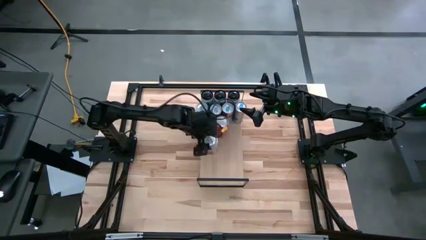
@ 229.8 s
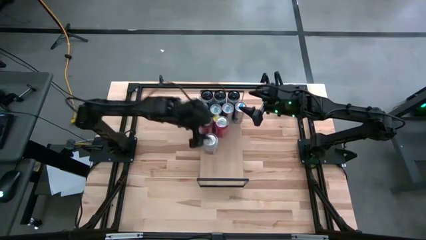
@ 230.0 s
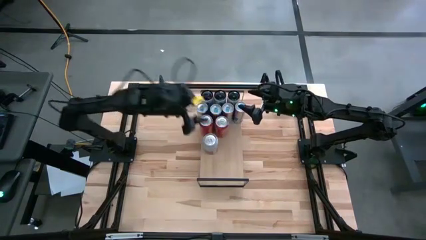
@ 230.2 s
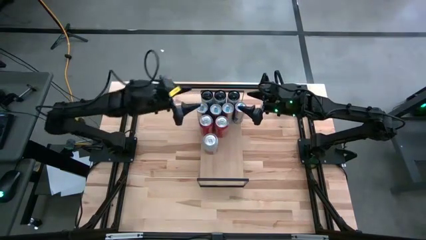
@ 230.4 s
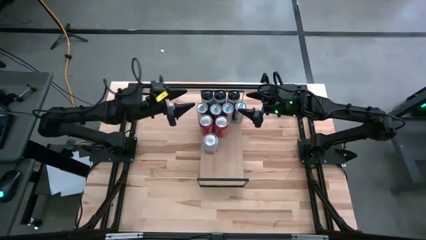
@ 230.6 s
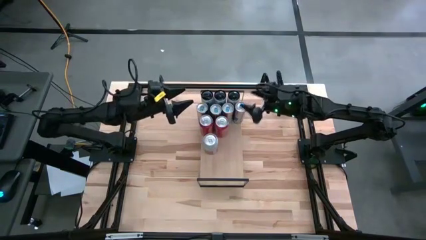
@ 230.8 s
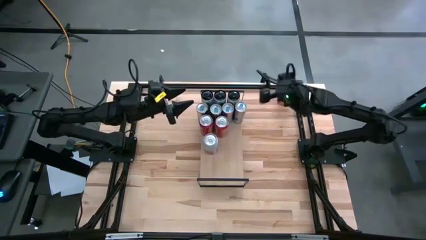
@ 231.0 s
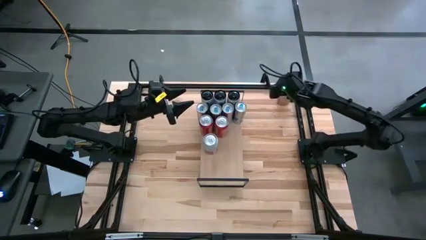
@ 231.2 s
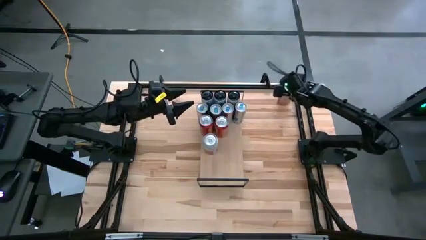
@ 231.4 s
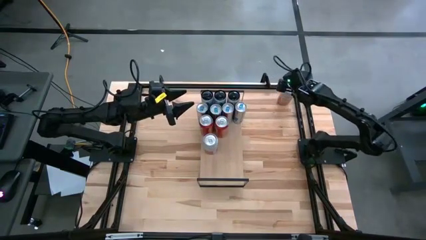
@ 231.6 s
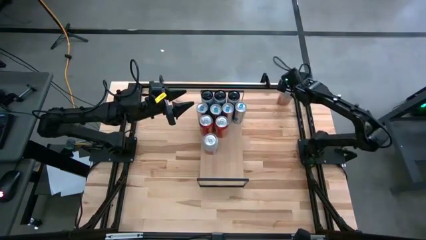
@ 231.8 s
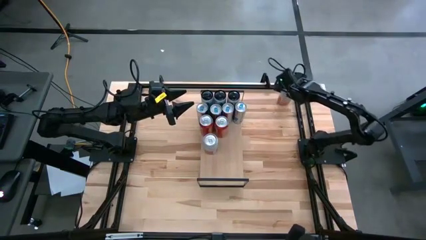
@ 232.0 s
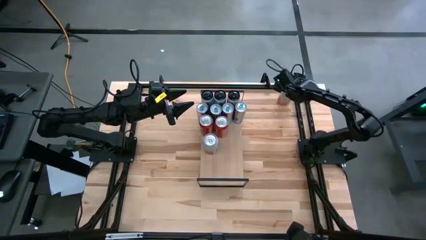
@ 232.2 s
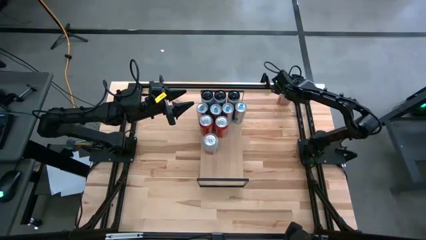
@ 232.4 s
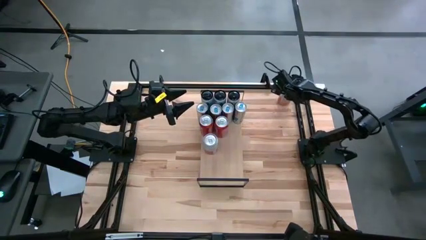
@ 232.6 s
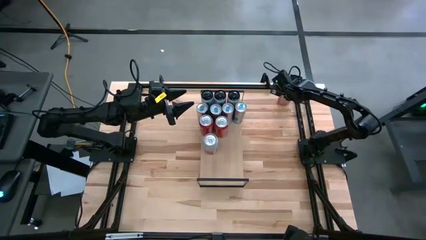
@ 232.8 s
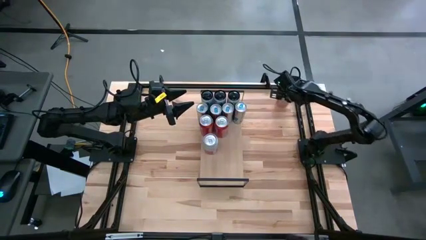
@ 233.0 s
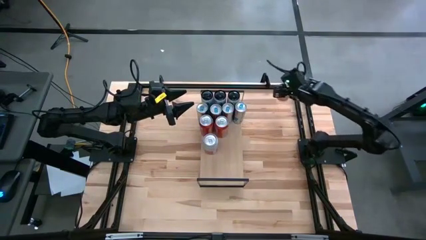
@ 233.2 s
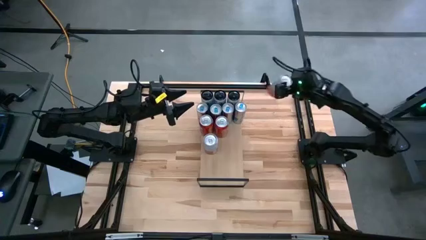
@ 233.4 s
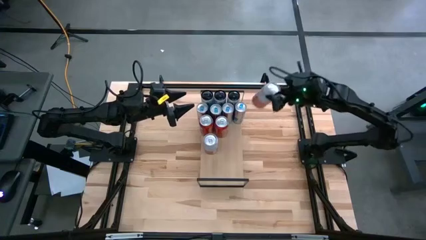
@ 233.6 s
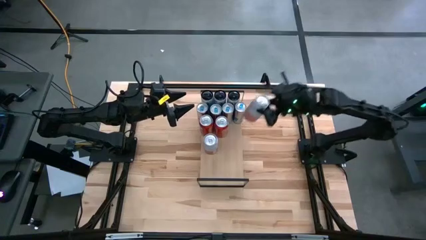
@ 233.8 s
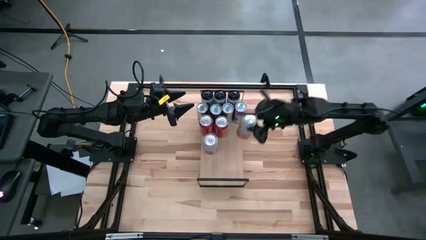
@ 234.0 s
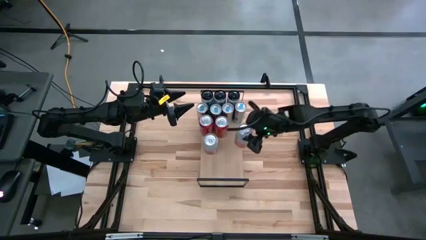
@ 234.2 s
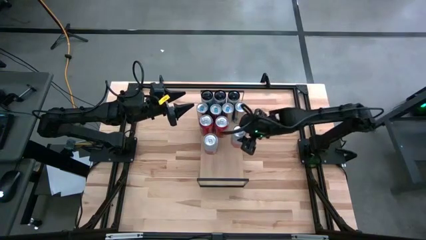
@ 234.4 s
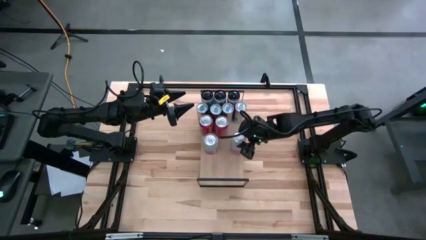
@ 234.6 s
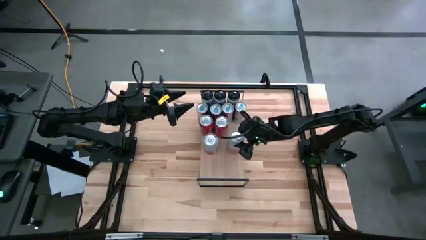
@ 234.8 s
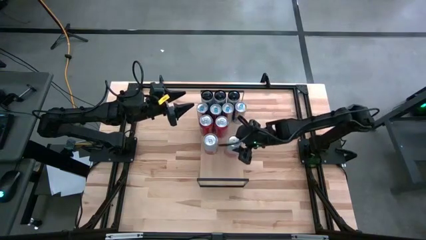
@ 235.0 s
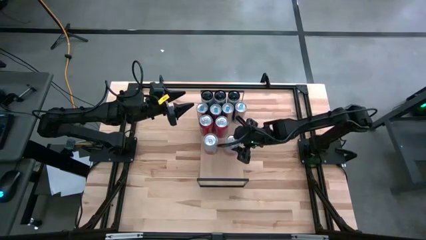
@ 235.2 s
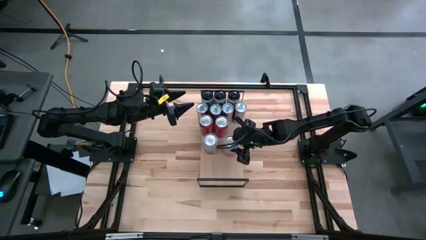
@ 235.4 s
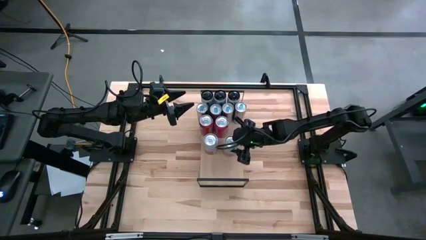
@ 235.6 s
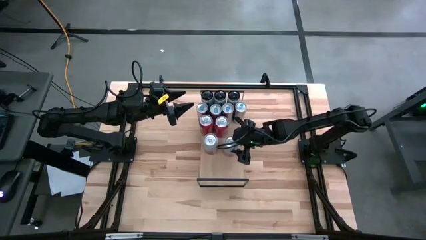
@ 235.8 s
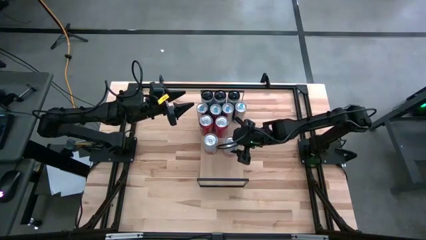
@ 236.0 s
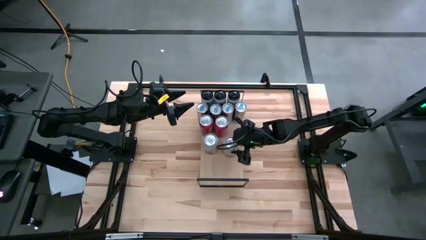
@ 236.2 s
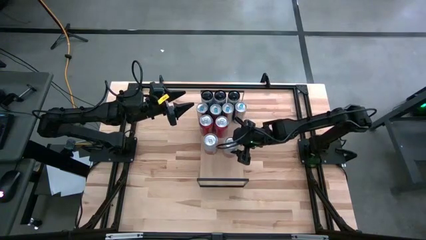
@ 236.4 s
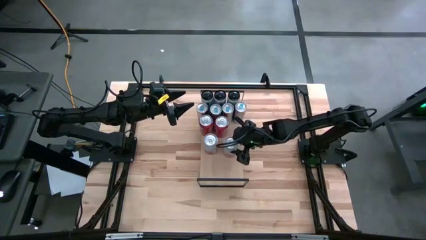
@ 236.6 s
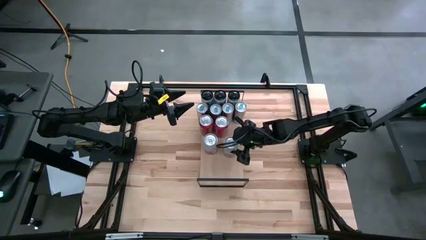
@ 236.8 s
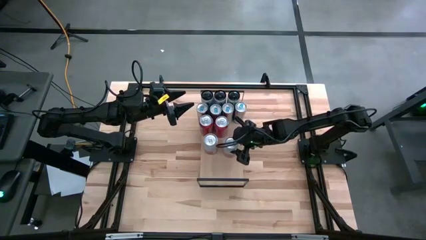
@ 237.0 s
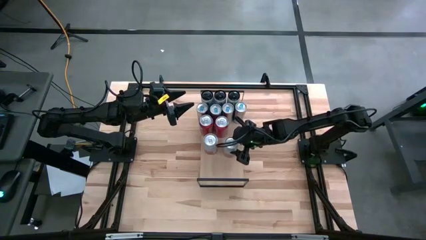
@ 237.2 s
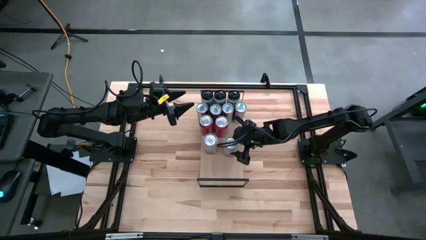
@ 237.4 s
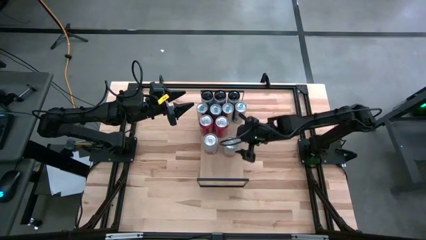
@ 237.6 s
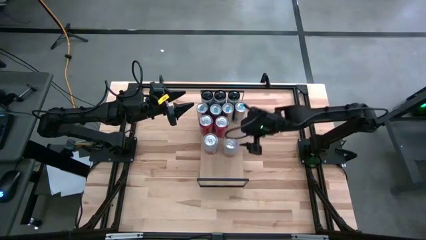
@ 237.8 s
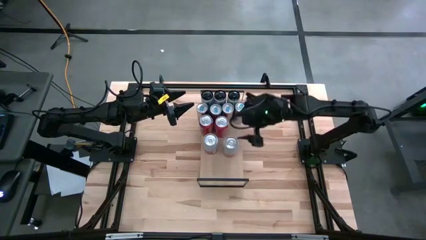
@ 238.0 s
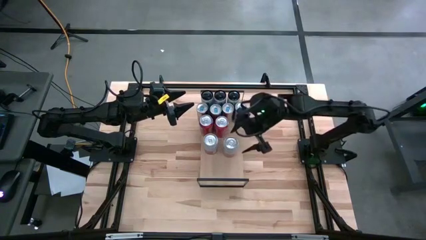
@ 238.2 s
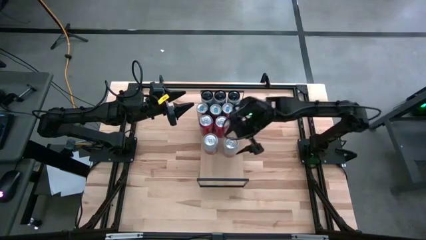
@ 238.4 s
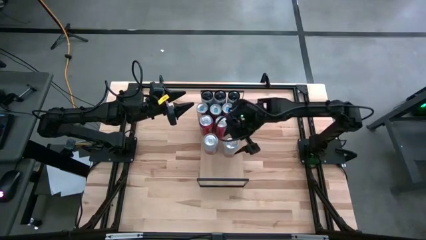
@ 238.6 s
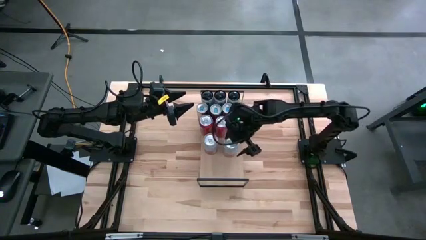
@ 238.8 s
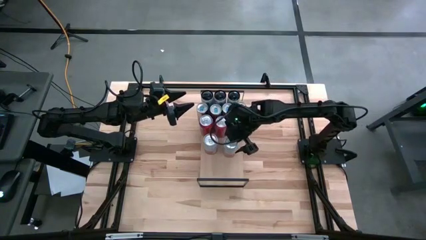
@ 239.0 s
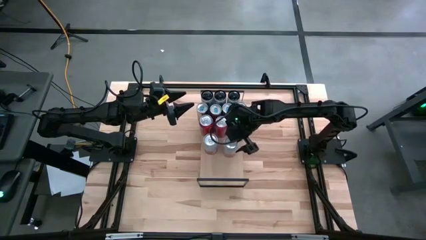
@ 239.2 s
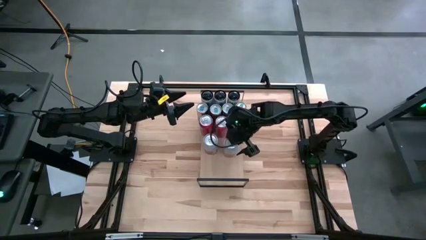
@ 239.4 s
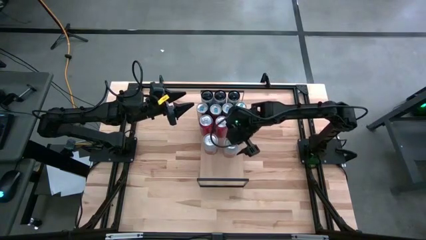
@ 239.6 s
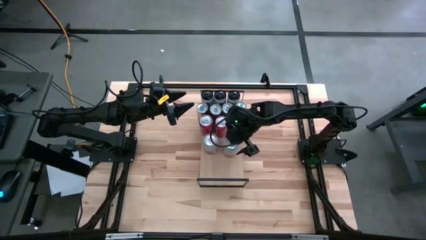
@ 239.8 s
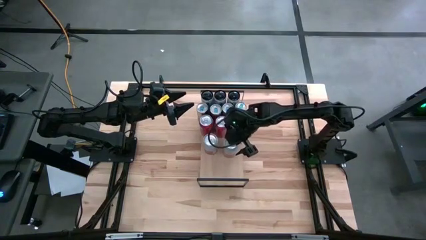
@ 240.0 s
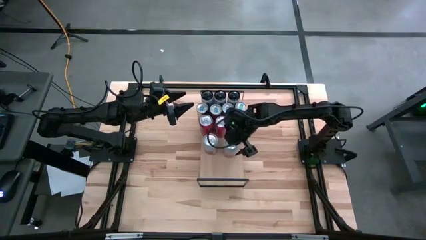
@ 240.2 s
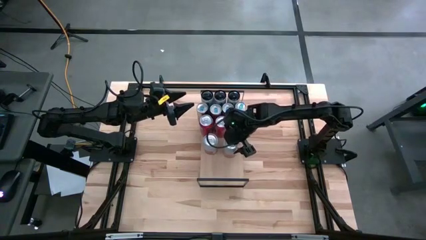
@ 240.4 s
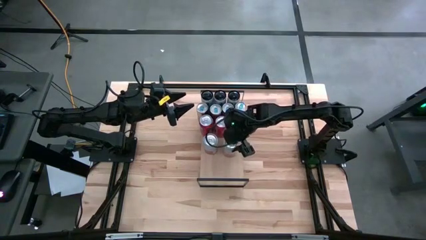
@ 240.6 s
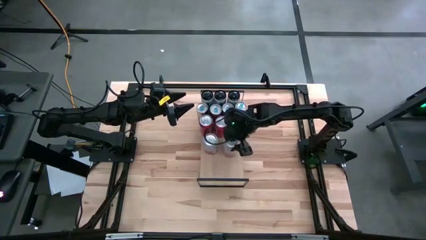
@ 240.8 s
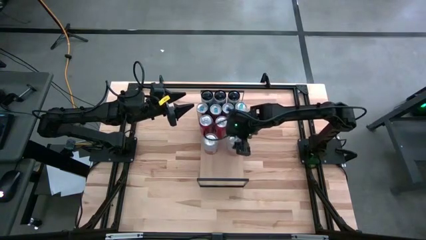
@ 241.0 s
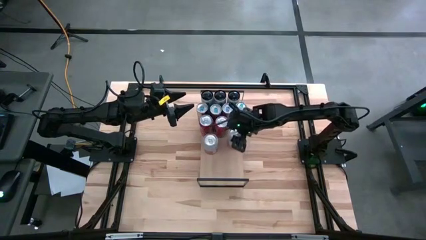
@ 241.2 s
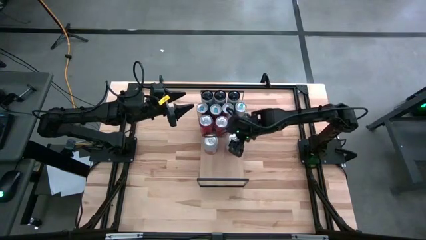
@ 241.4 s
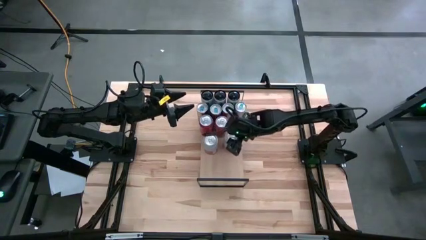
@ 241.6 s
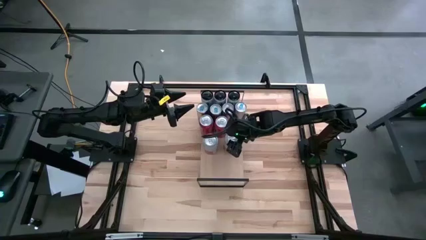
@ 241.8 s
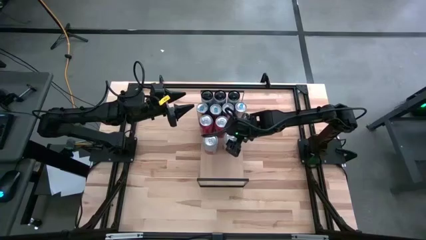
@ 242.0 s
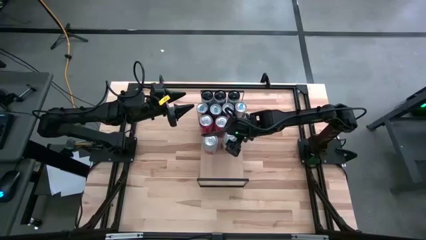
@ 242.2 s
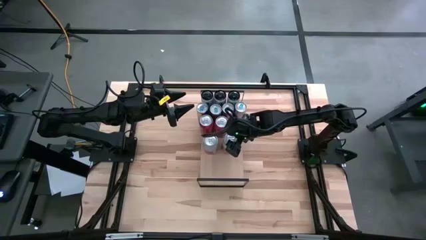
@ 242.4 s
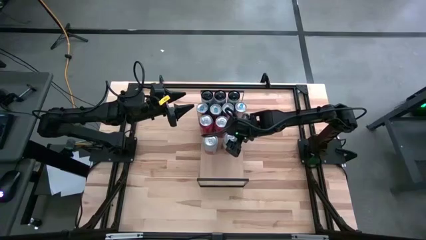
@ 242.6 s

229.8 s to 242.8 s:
Task: Place canned beverage on shelf
Put the pink-white soda can on the shelf aligned with the other pink-white soda can

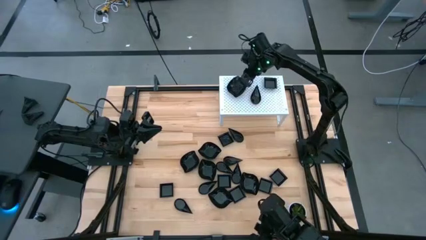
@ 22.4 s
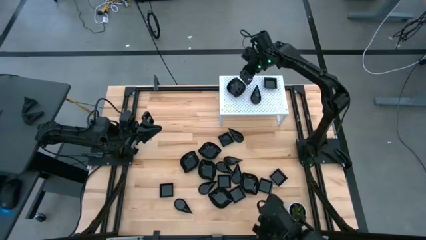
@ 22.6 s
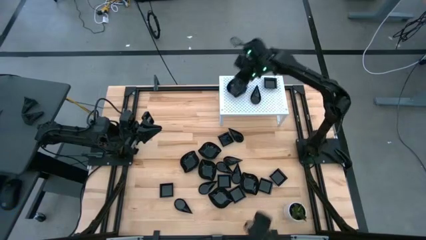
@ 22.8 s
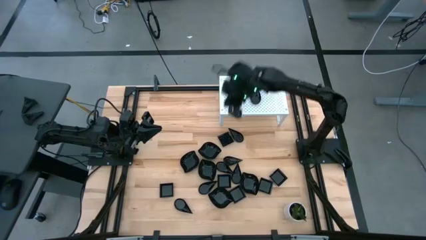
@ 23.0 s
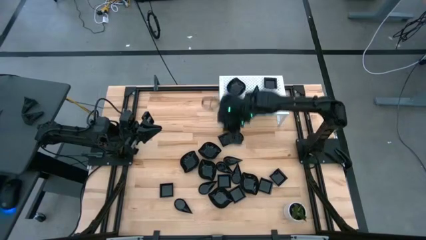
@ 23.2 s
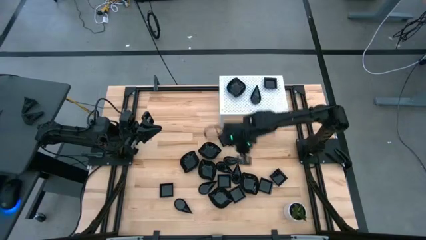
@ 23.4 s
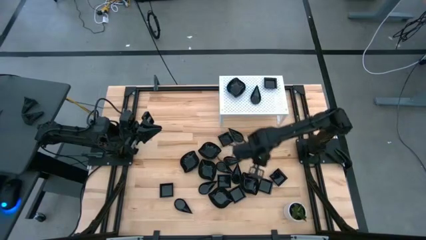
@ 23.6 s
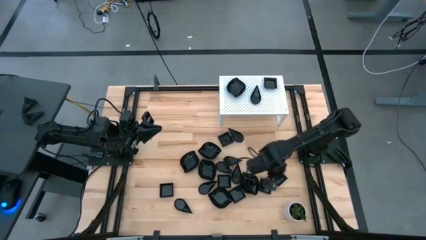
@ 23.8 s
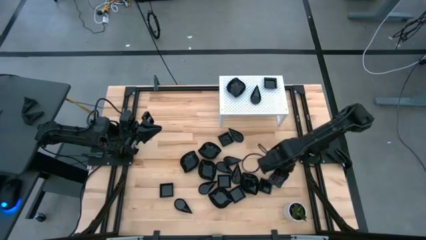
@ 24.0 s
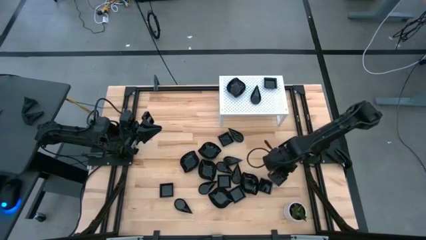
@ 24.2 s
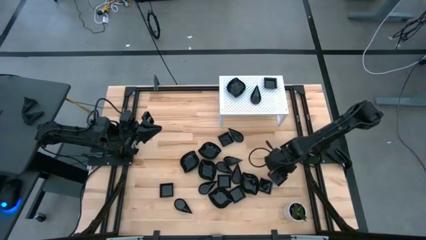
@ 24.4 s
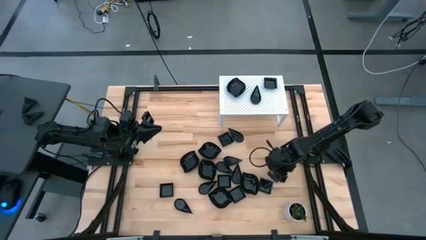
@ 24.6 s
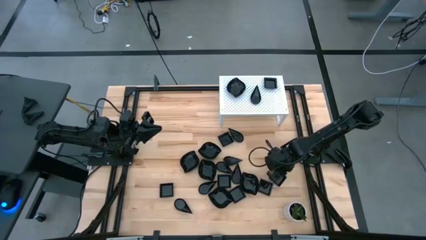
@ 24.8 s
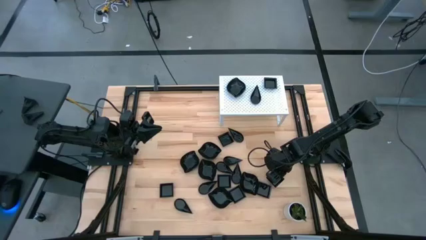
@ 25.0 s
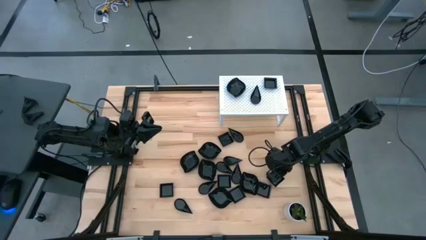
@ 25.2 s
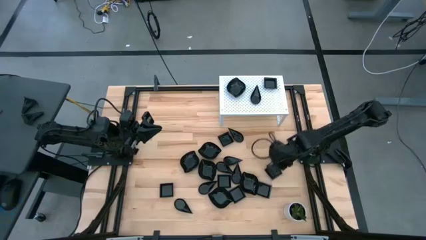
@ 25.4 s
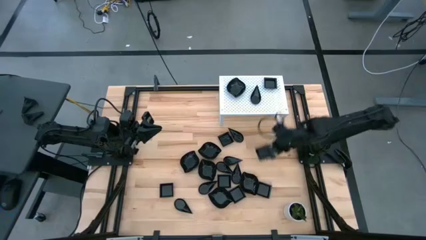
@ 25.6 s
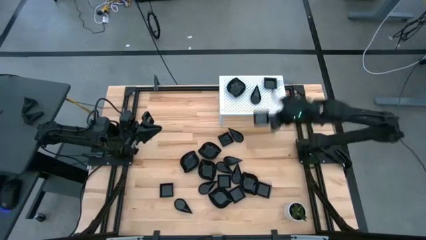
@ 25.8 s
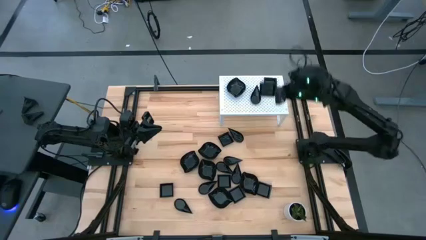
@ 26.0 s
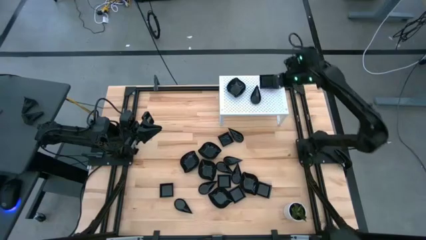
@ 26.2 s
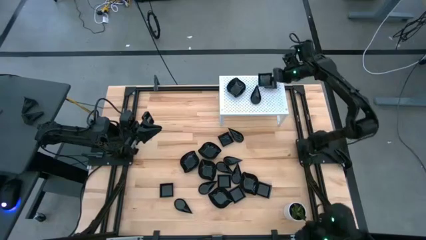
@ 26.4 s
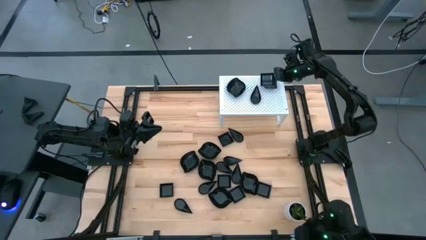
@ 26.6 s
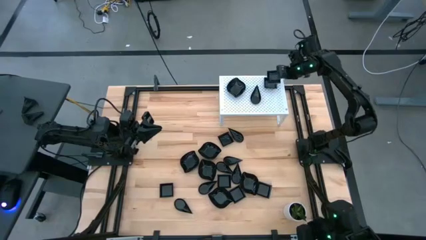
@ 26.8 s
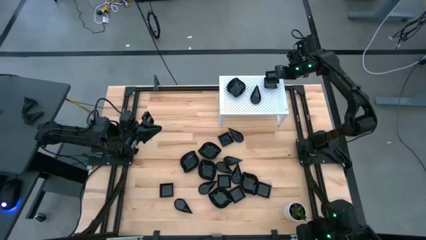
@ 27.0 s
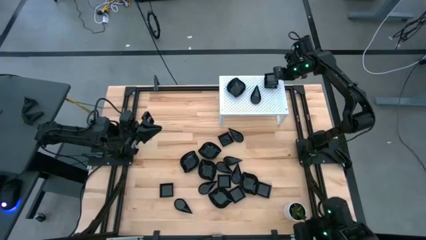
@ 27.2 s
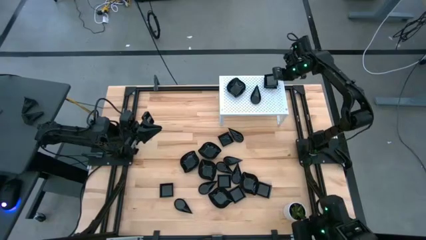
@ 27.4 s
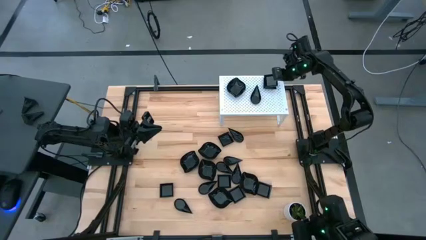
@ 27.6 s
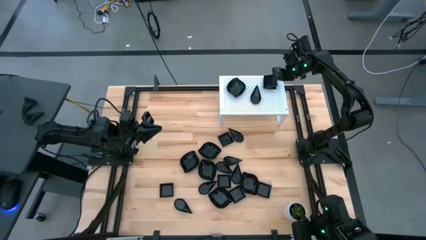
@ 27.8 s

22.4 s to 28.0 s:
Task: Pick & Place Mini shaped plates
Stack the square plate on top of the square plate on the shelf
